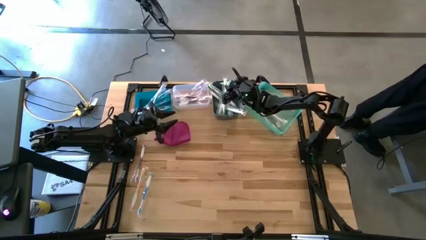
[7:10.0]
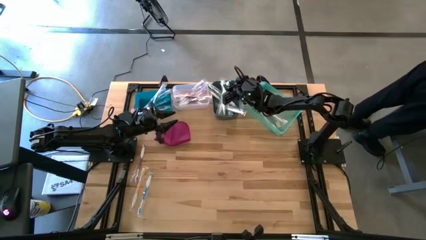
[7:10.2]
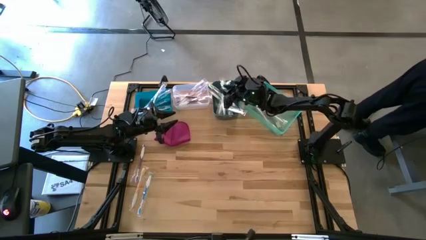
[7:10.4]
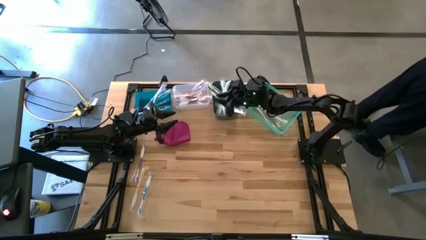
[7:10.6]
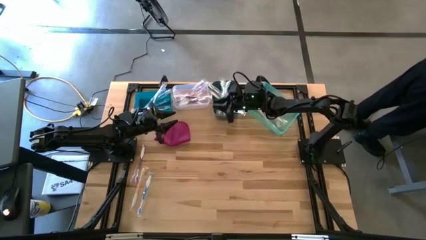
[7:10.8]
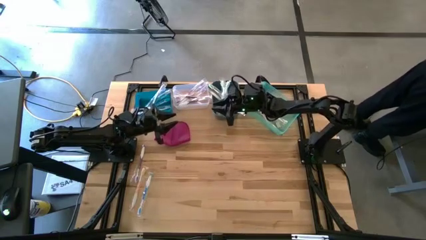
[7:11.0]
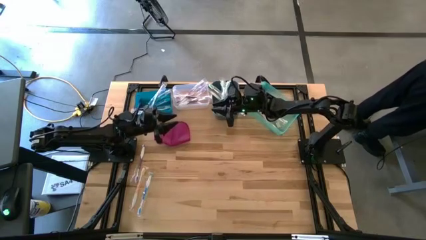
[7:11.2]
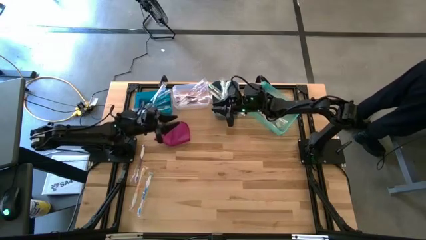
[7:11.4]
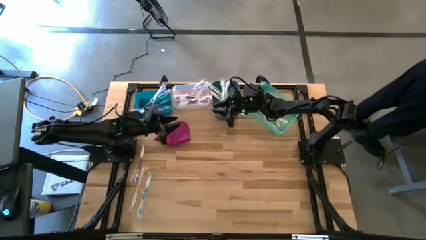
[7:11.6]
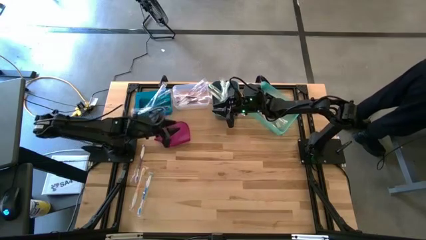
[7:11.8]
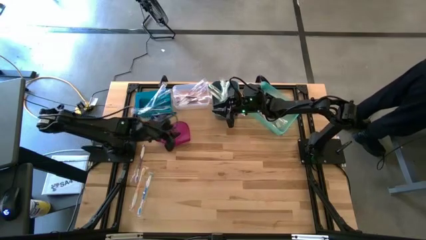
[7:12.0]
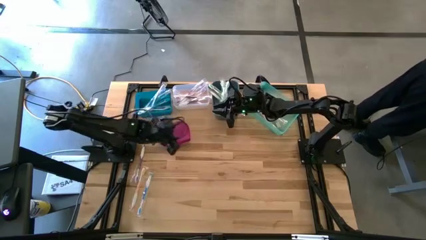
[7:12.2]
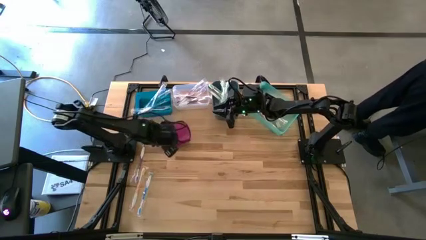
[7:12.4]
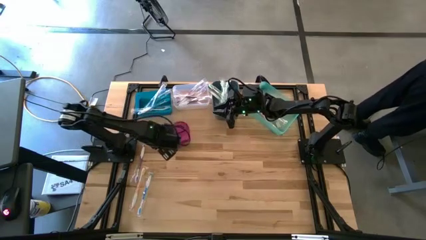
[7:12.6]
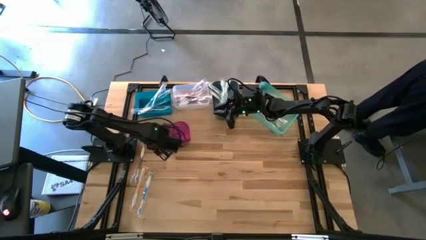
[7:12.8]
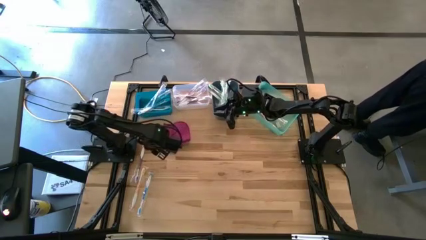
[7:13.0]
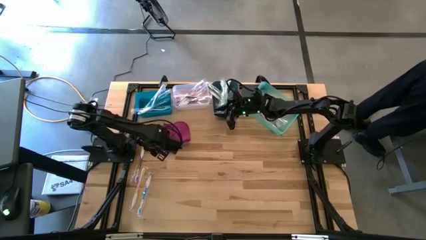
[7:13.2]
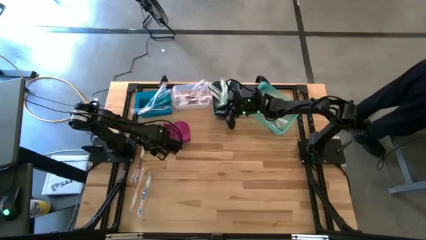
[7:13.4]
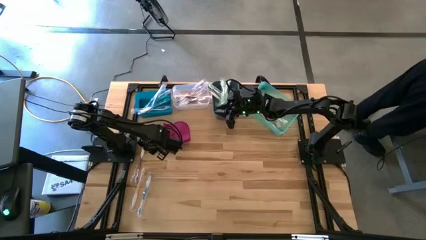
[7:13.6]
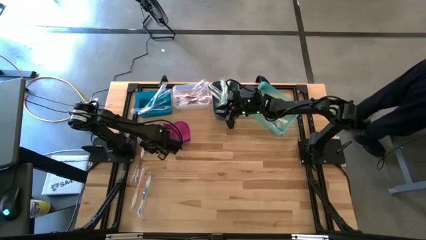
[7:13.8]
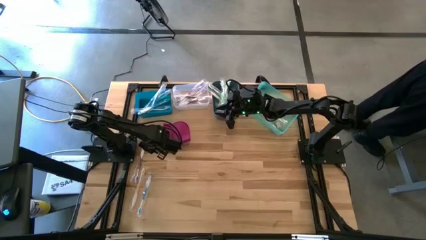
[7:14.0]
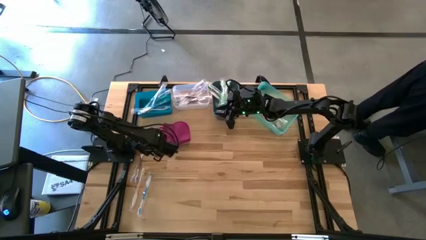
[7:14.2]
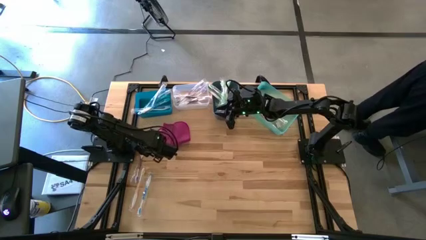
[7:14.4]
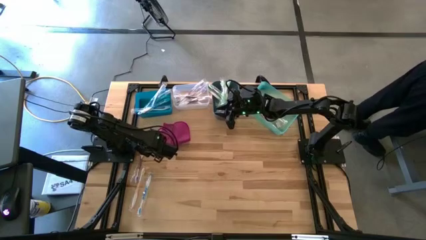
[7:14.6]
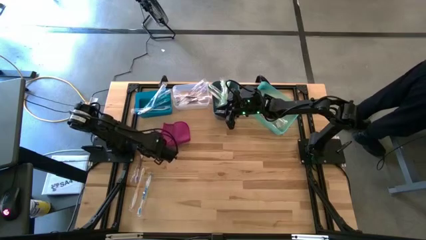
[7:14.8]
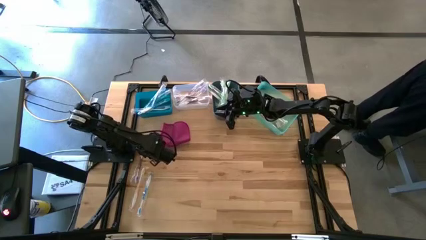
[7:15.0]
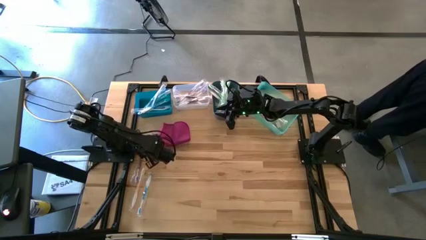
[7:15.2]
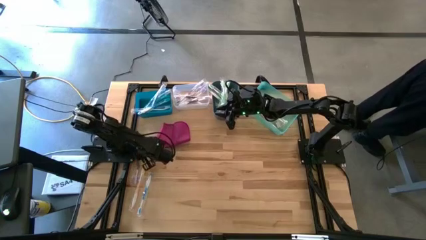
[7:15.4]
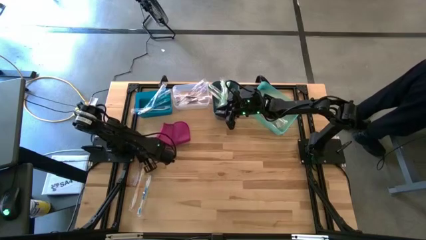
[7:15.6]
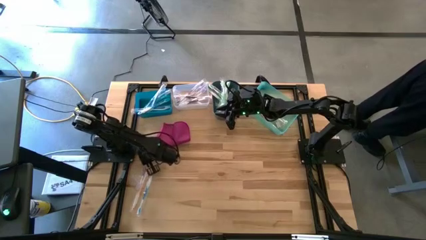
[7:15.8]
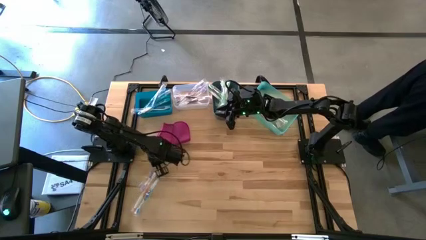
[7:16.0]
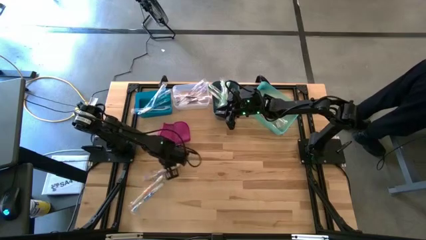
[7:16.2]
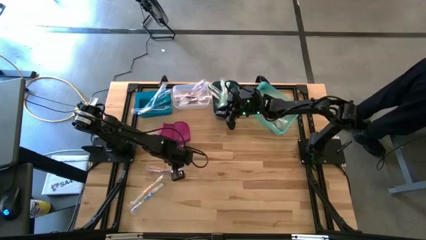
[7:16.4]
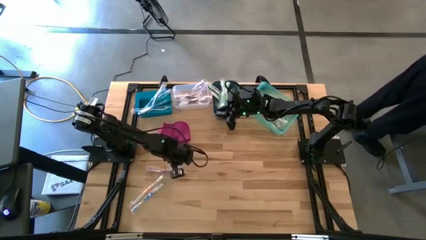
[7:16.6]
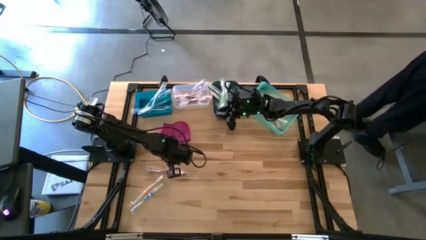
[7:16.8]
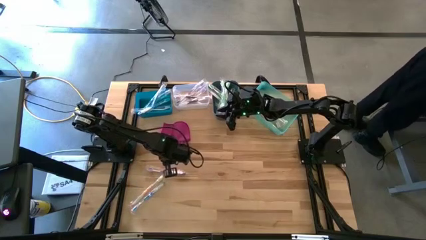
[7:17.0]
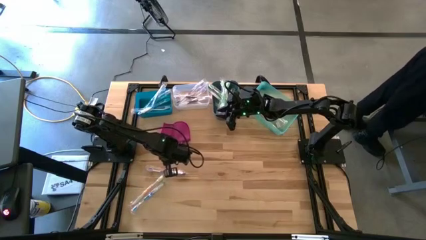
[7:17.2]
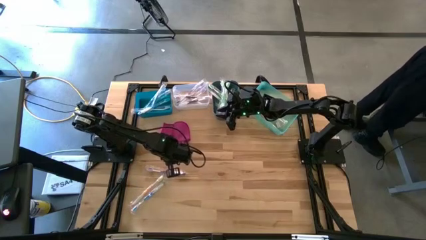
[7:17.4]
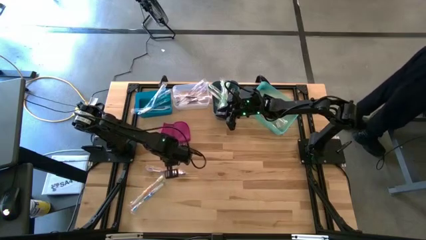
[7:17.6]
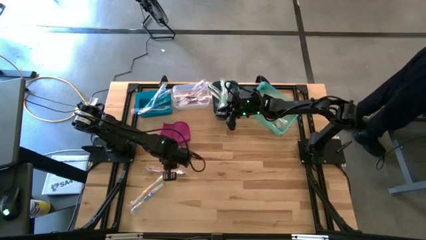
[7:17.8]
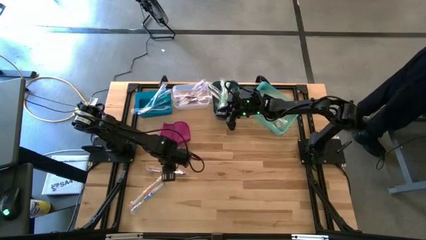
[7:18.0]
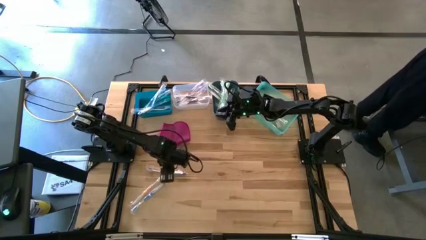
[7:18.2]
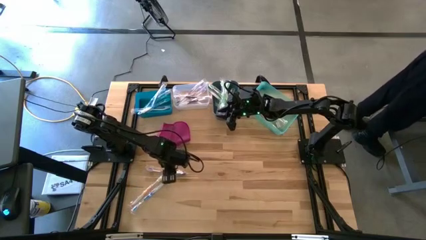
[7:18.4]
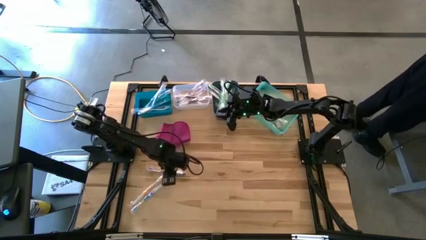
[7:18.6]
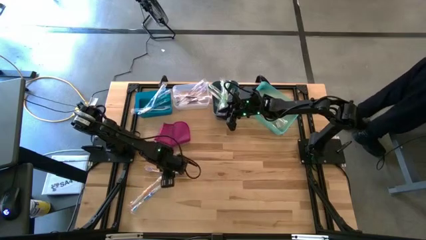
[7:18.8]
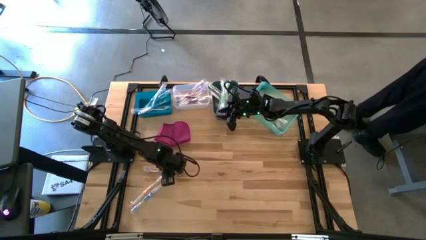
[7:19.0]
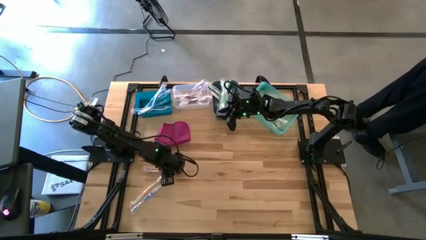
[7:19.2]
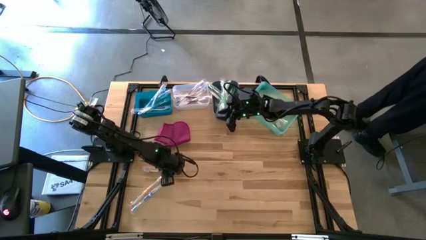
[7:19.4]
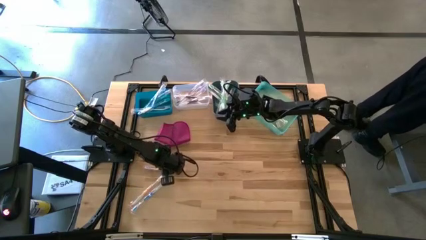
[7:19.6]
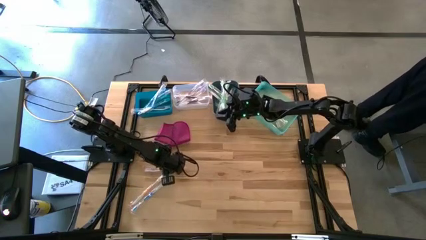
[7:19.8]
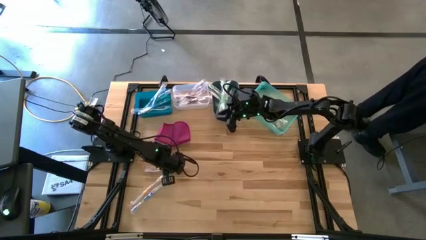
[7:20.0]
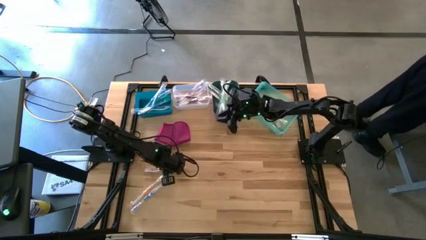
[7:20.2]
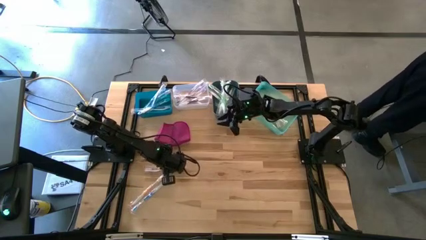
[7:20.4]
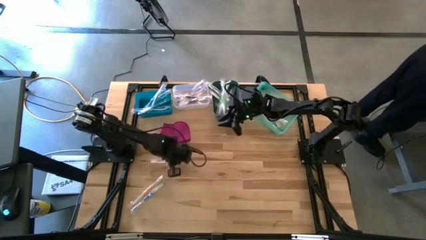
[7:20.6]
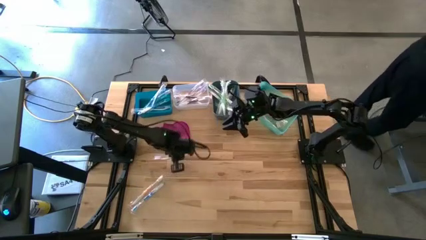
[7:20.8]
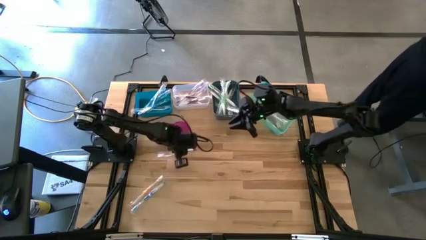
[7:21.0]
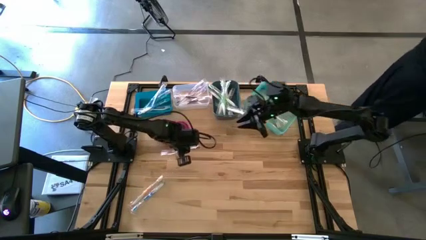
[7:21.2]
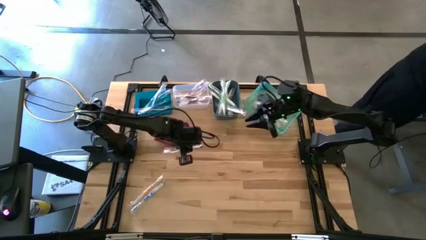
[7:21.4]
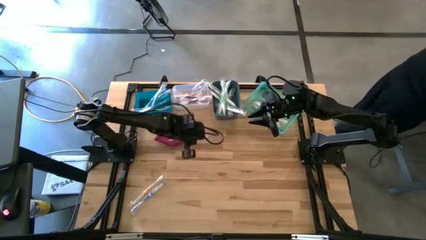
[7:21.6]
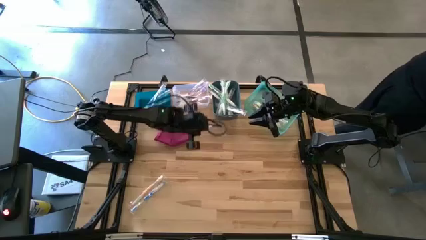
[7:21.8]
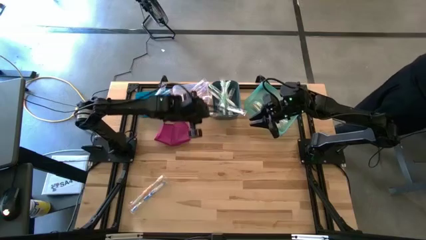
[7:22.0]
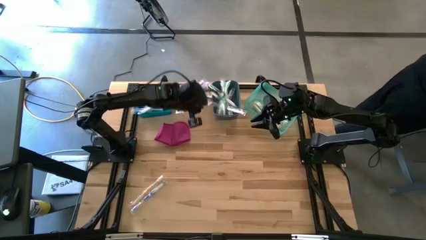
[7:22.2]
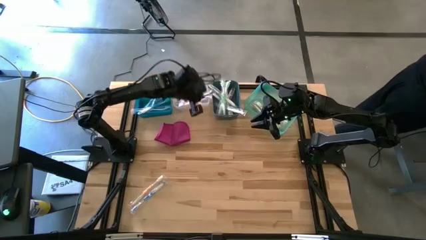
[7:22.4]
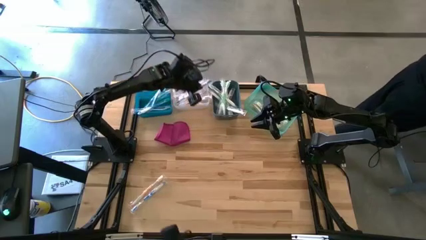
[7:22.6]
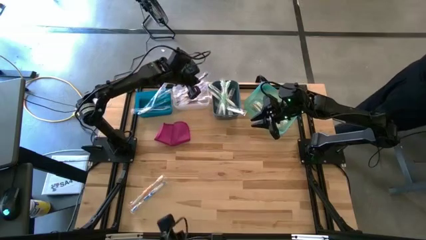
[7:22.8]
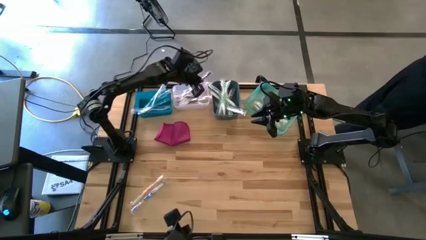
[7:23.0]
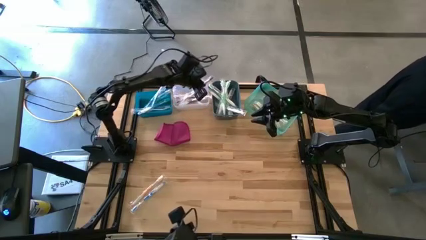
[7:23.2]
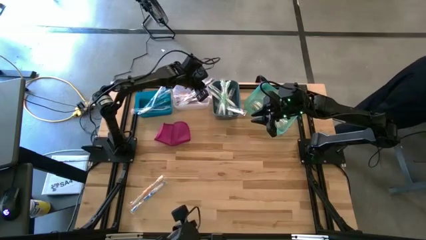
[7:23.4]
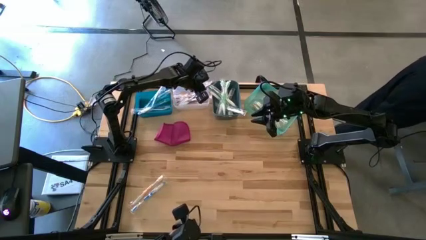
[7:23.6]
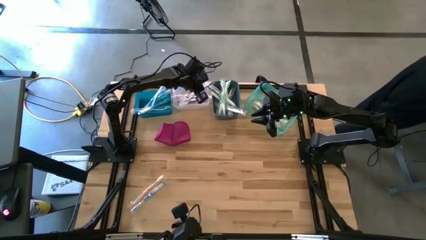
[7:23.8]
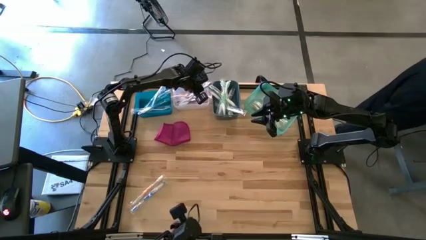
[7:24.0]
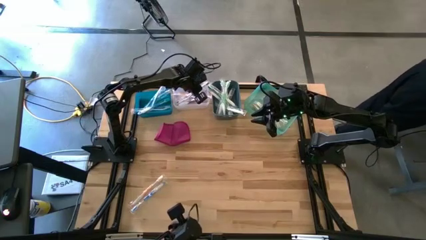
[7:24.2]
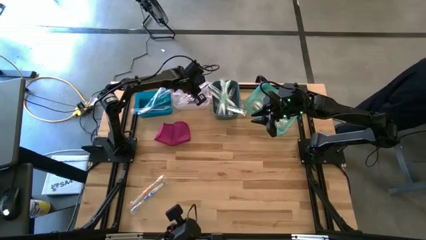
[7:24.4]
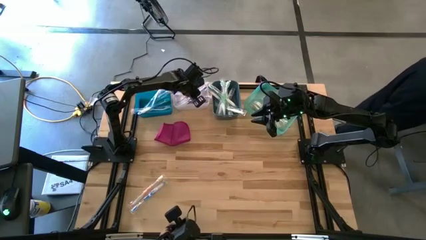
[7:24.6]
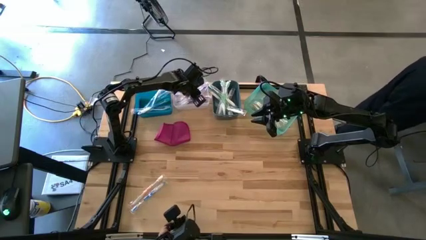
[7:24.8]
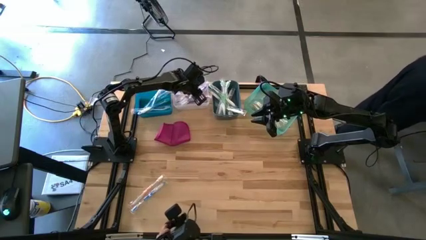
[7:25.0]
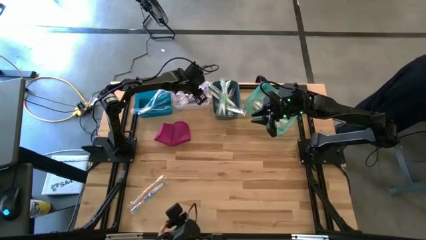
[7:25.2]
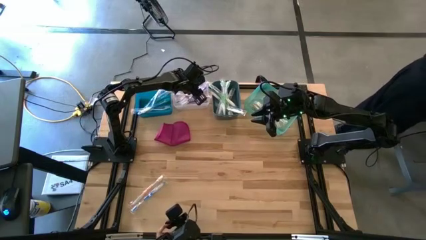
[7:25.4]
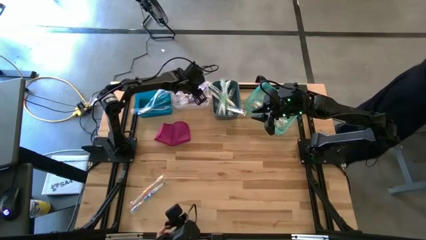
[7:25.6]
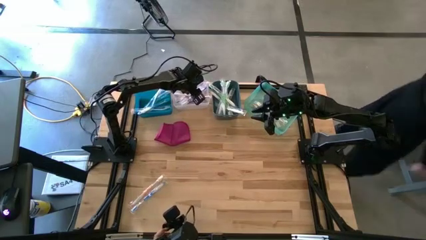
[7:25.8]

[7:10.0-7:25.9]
Task: Pick & Place Toothbrushes
Put the violet toothbrush into the white bin
